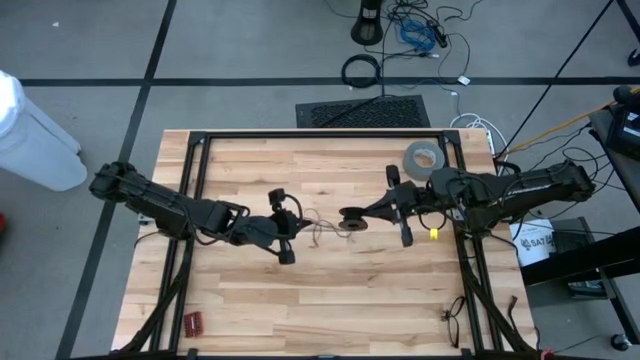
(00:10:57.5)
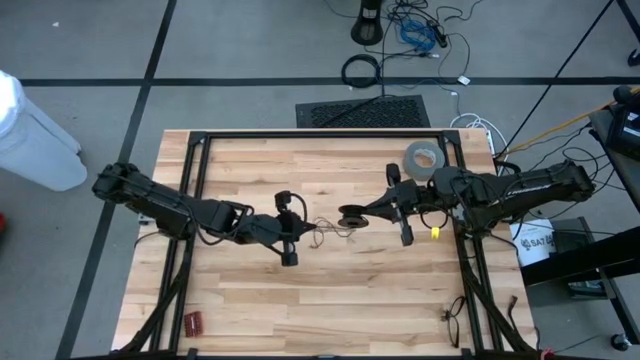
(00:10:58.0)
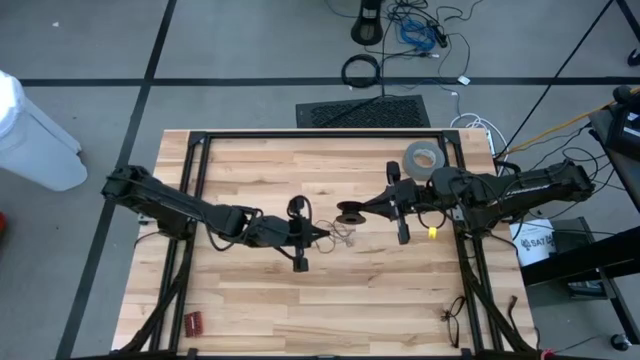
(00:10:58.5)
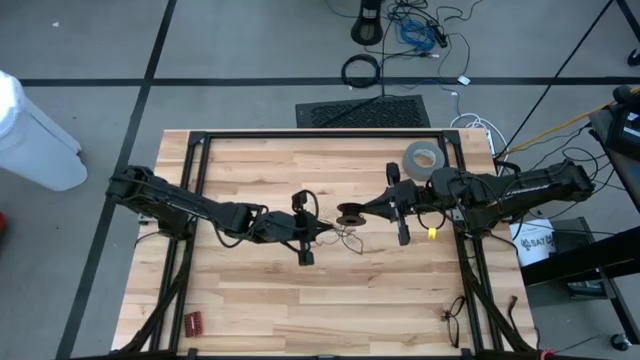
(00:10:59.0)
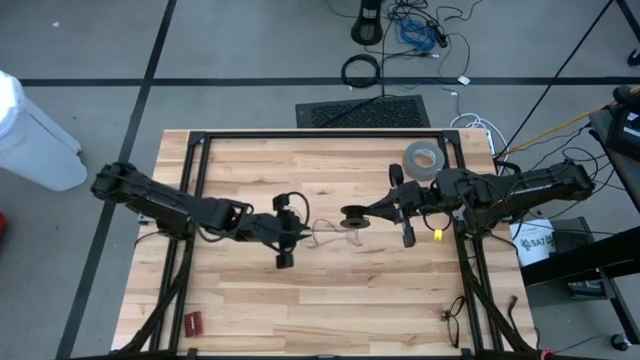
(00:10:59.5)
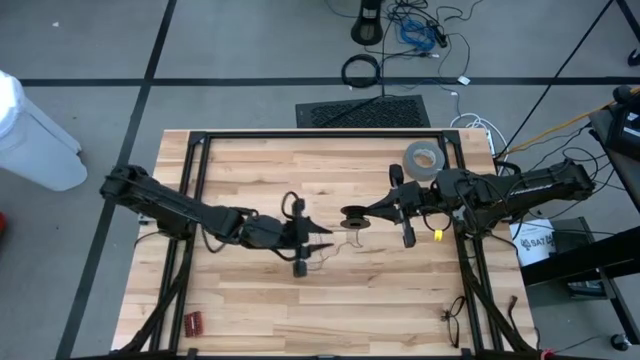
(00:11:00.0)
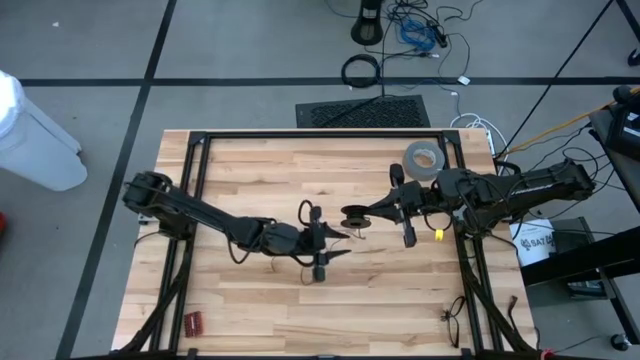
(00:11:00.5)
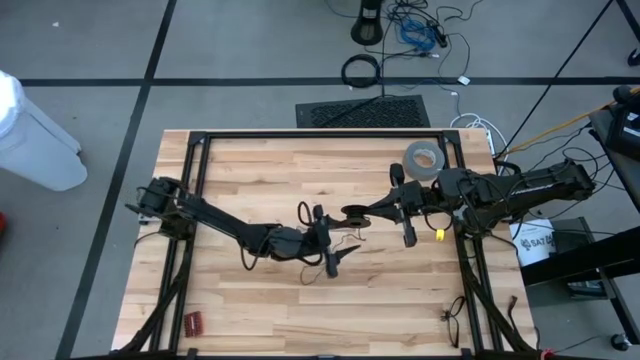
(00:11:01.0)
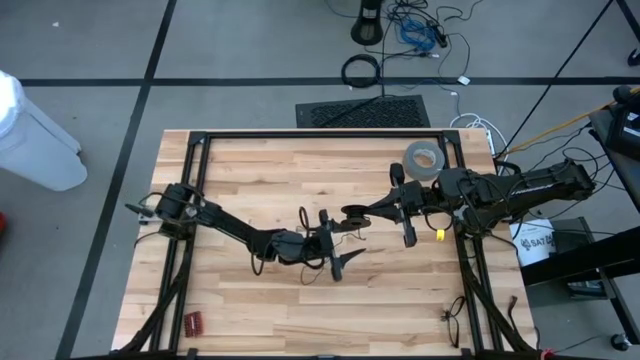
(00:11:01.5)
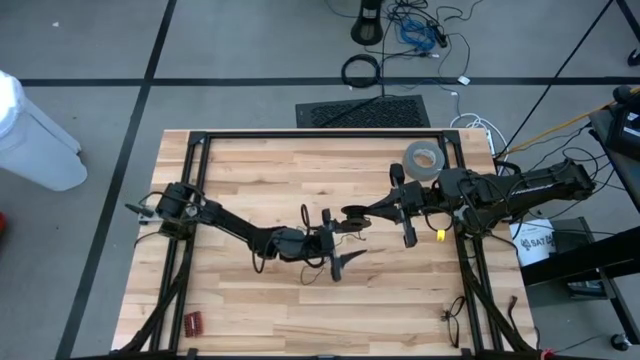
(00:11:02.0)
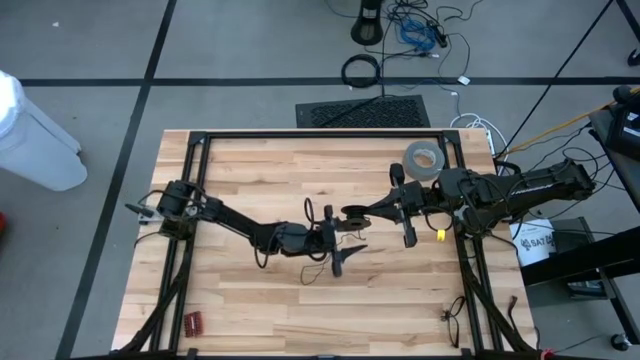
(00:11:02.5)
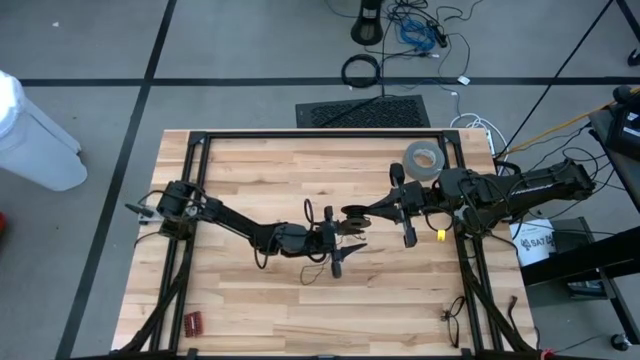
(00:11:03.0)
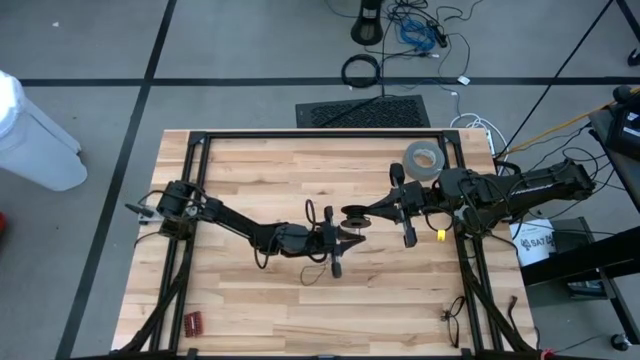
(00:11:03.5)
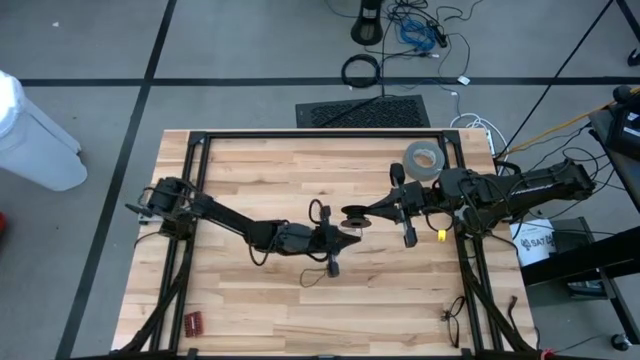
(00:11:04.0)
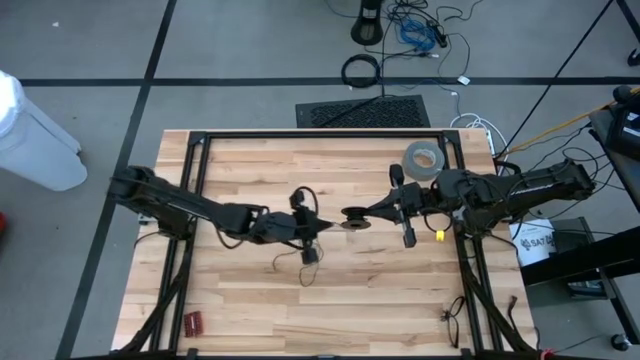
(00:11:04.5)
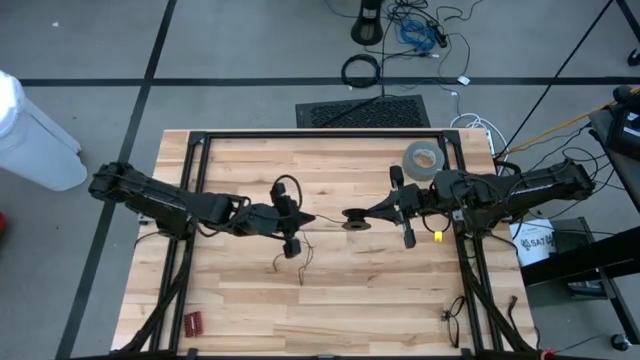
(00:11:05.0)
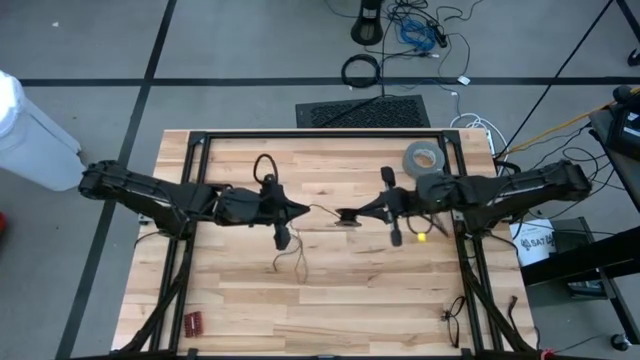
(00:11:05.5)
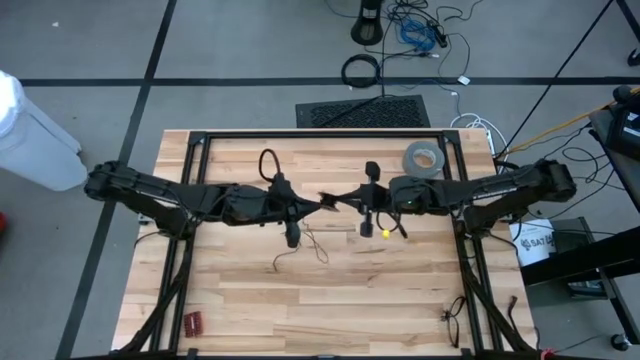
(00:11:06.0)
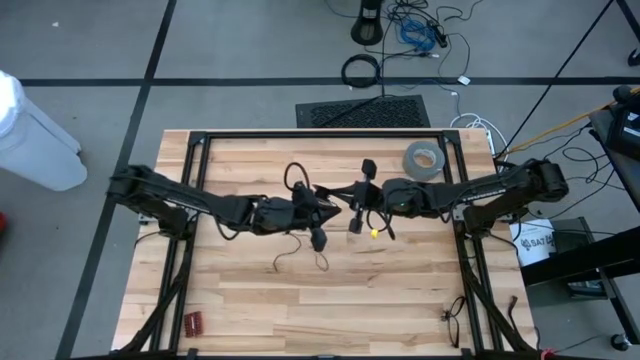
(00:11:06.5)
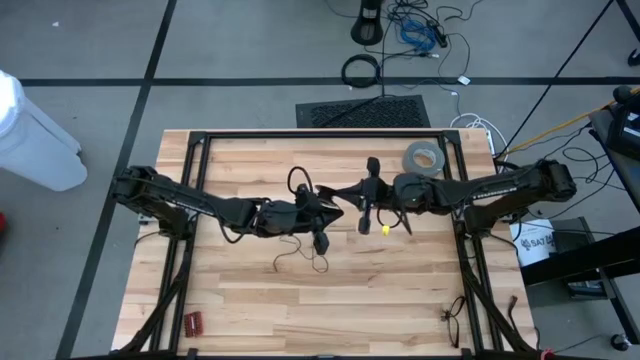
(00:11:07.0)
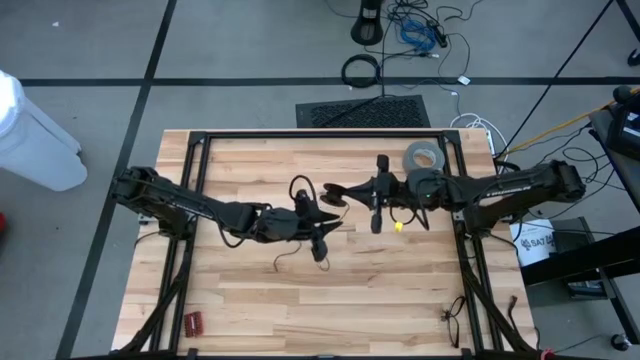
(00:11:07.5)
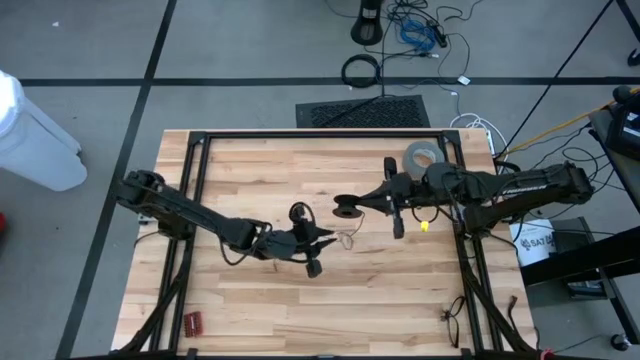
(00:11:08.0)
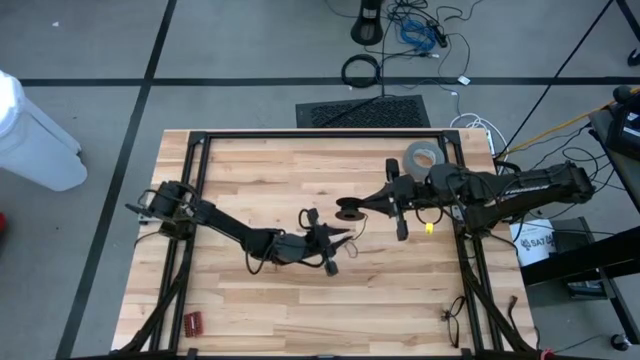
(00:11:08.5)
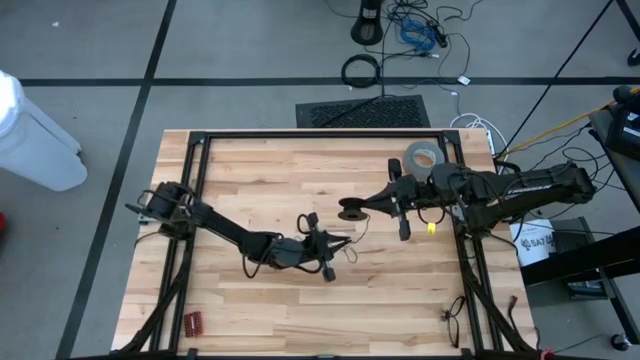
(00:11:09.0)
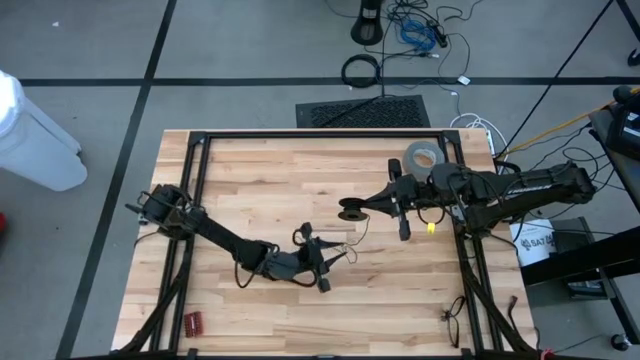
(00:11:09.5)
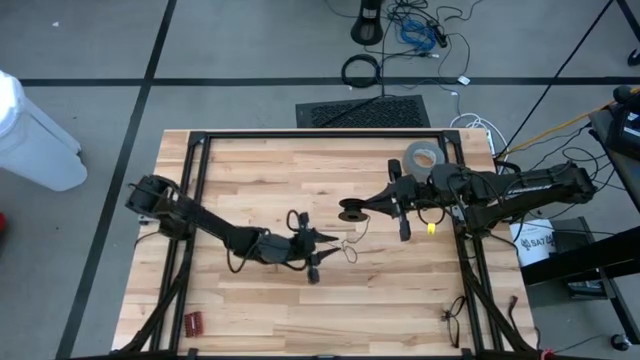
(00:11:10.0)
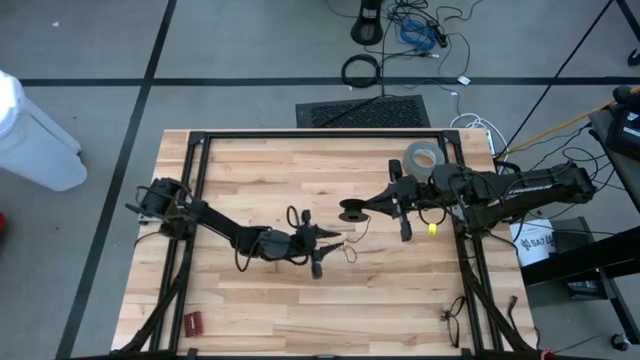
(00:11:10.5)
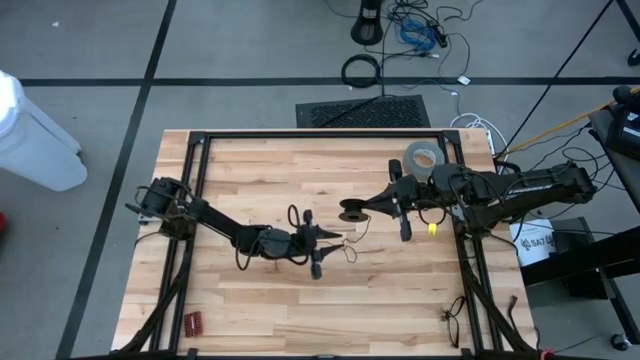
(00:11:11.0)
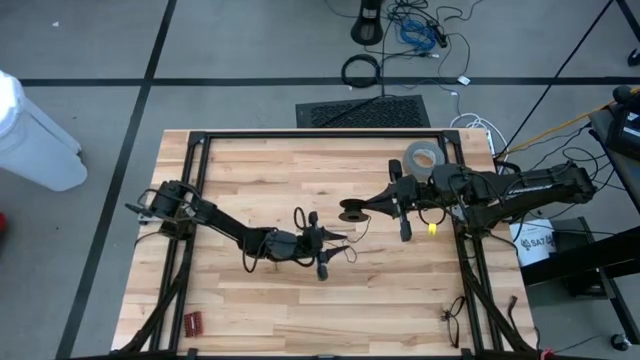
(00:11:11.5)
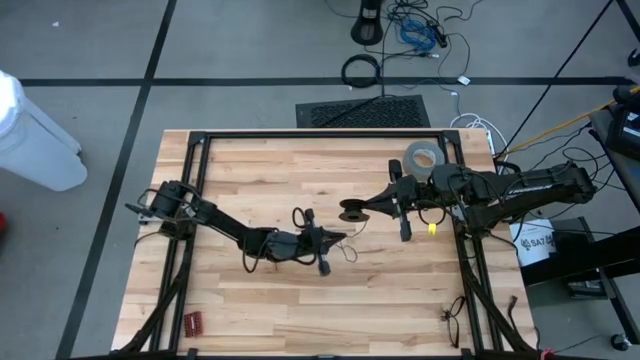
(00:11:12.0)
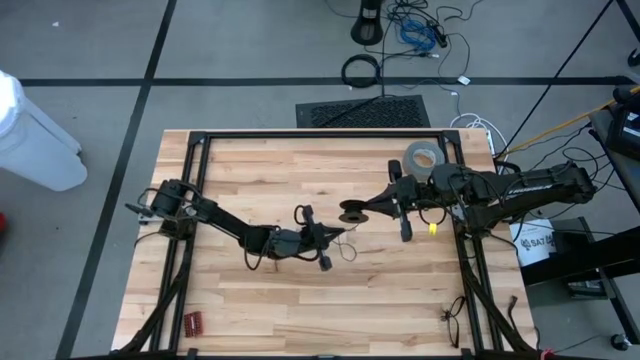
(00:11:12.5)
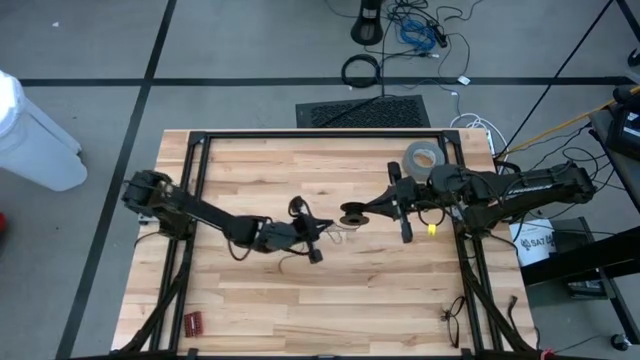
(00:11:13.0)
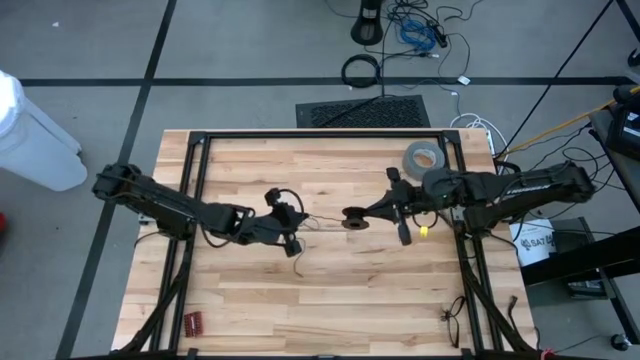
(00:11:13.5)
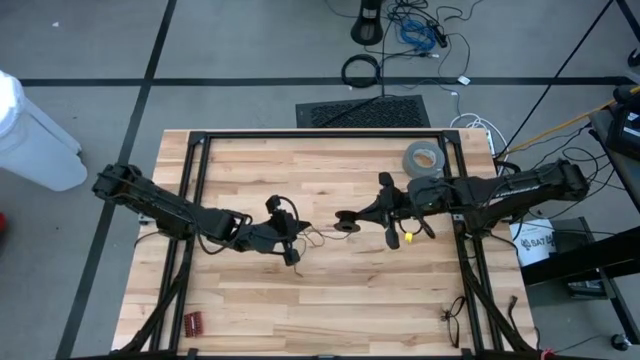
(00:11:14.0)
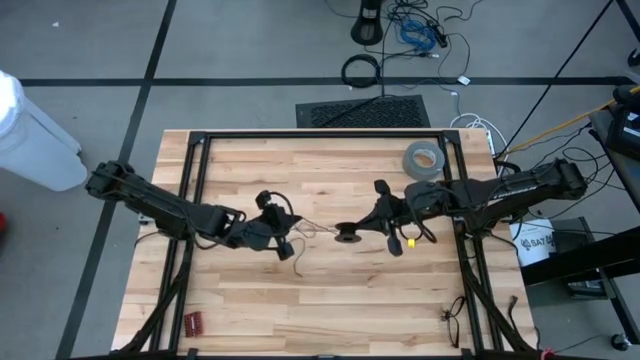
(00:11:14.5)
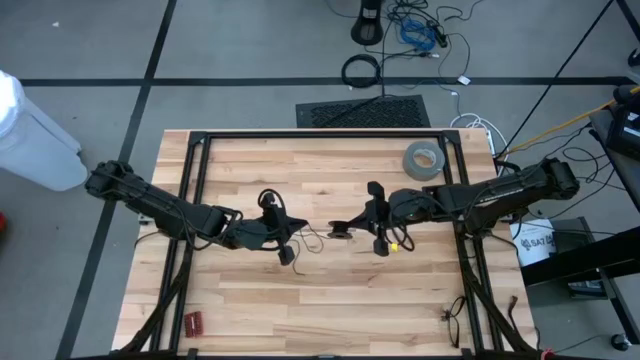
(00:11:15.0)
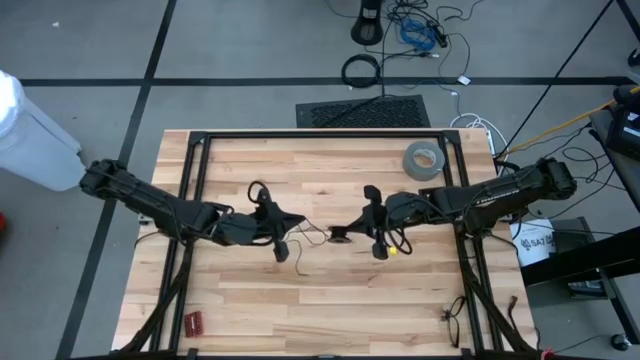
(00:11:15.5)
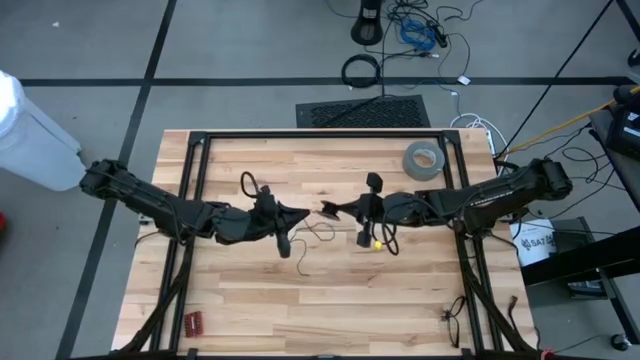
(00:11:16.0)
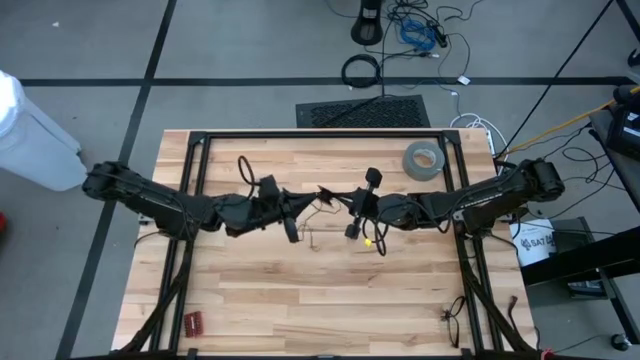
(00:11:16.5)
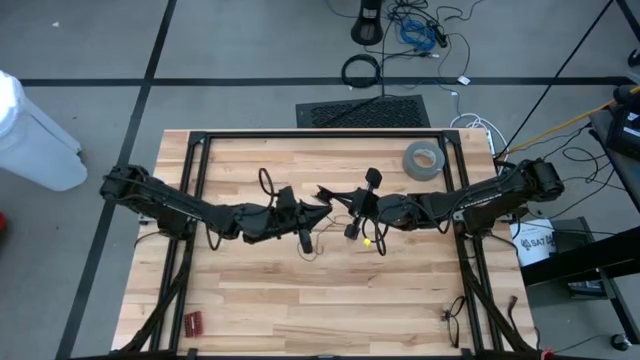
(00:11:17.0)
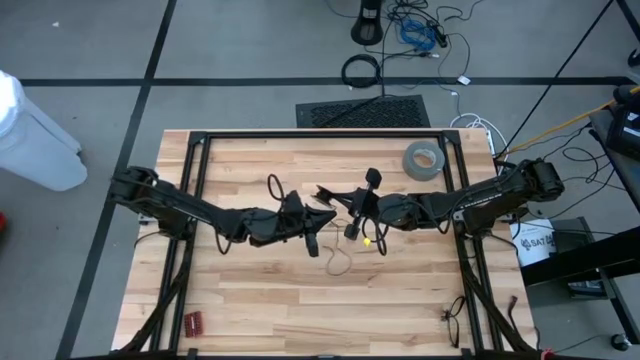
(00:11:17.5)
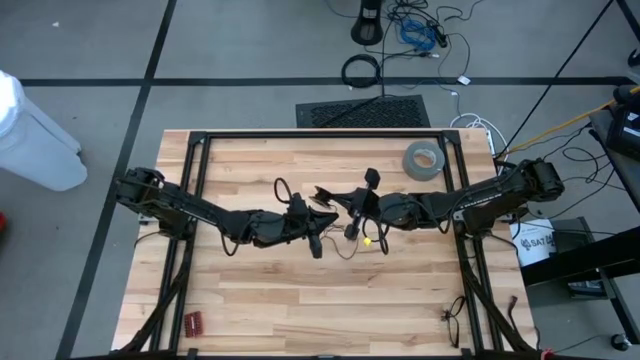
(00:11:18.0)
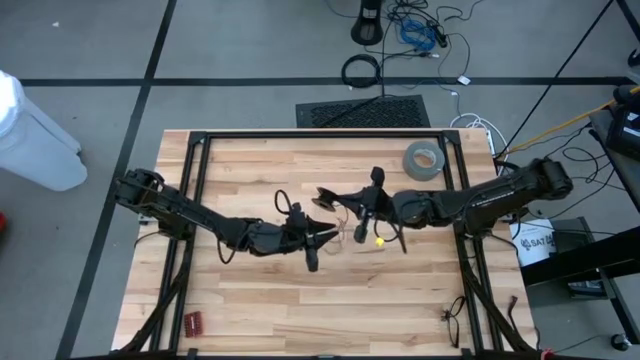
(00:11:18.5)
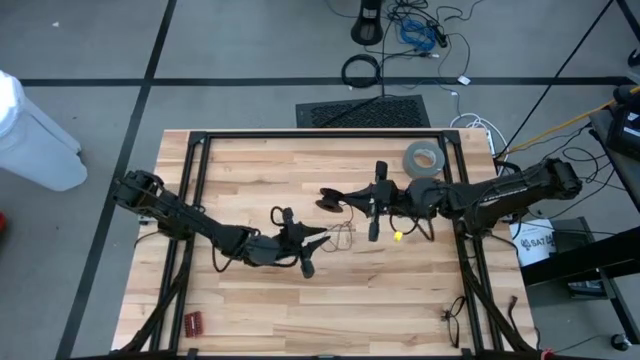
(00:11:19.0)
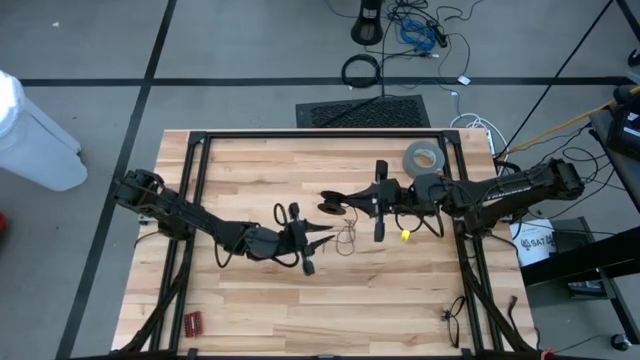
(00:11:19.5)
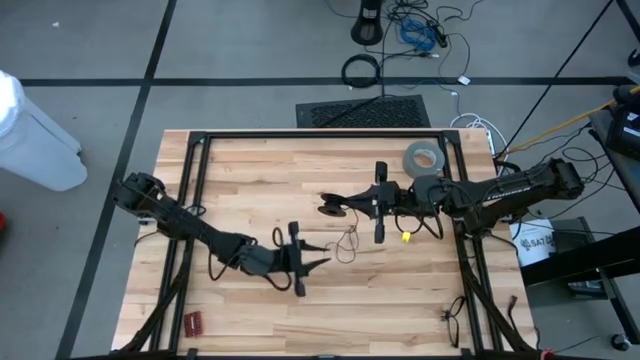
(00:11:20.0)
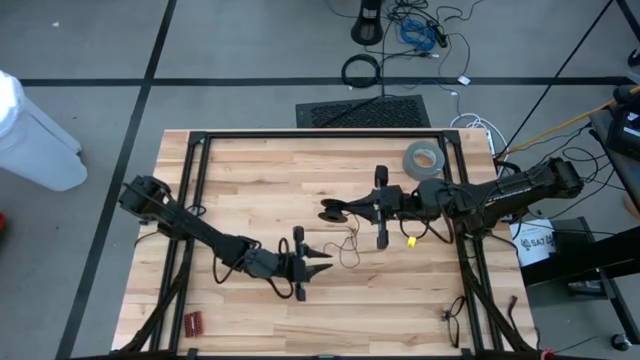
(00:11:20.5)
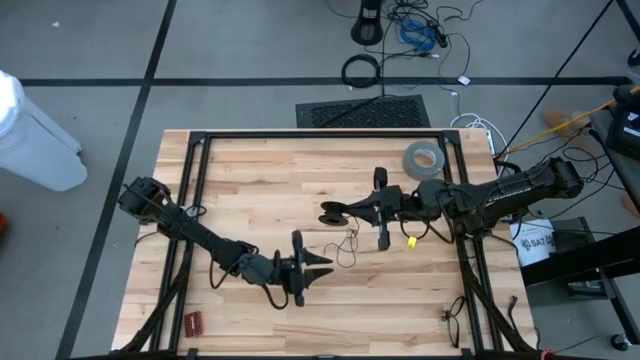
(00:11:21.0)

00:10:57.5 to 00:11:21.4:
Task: Coil cords
Coil the black wire onto the spool
